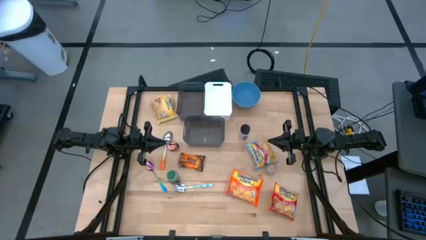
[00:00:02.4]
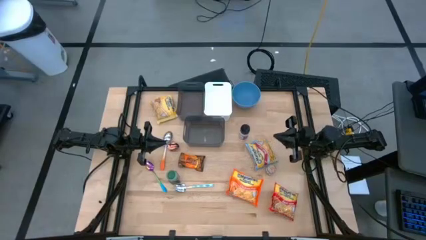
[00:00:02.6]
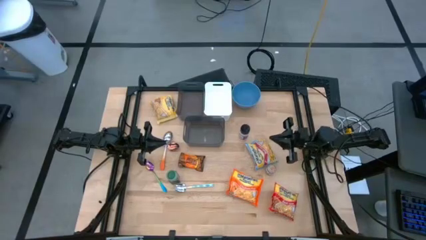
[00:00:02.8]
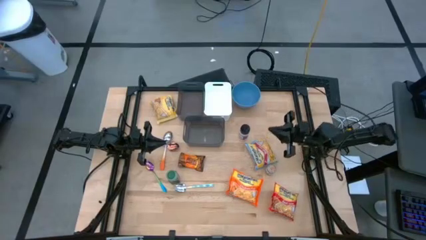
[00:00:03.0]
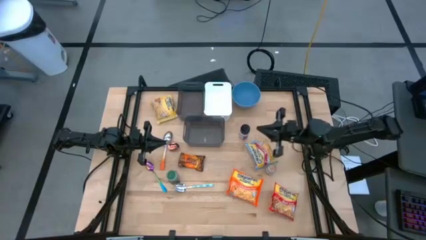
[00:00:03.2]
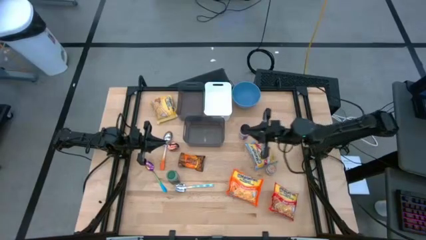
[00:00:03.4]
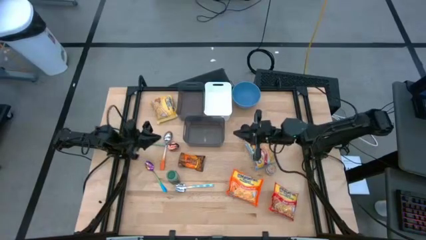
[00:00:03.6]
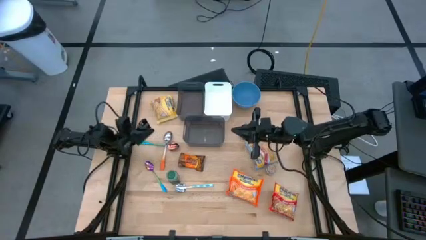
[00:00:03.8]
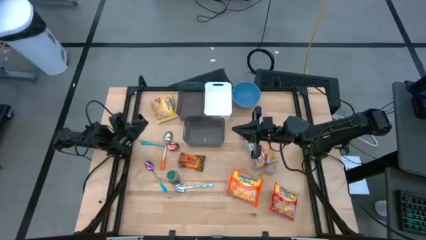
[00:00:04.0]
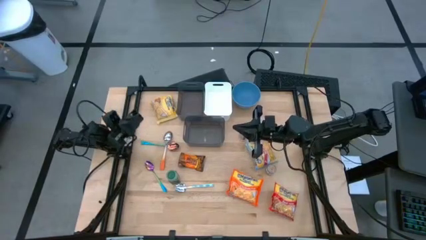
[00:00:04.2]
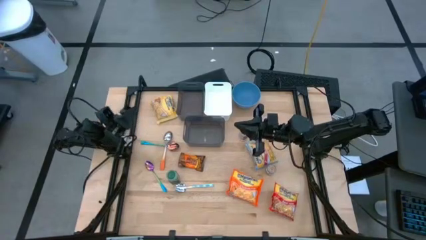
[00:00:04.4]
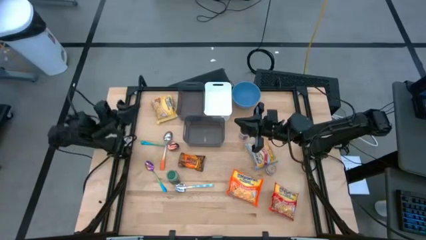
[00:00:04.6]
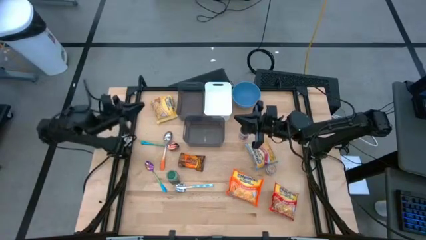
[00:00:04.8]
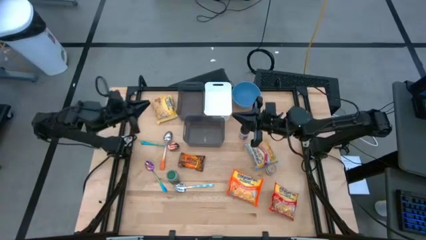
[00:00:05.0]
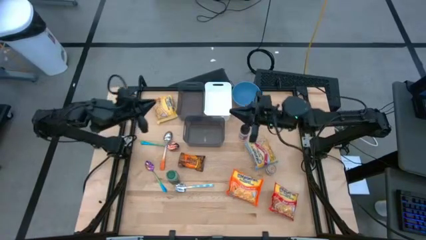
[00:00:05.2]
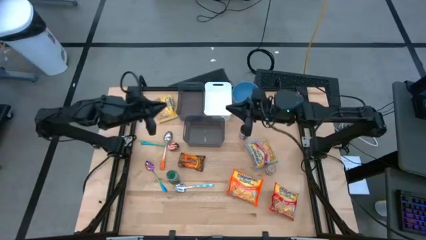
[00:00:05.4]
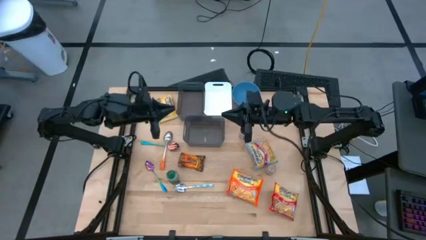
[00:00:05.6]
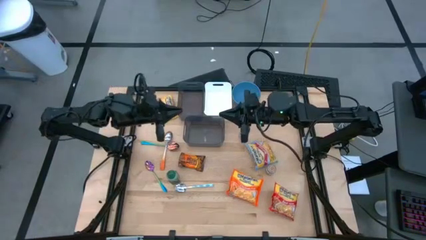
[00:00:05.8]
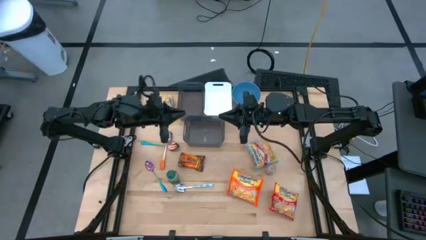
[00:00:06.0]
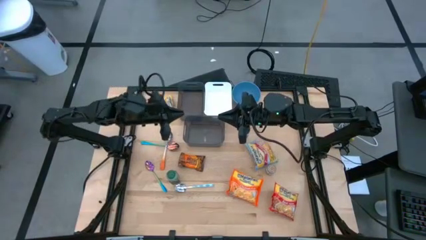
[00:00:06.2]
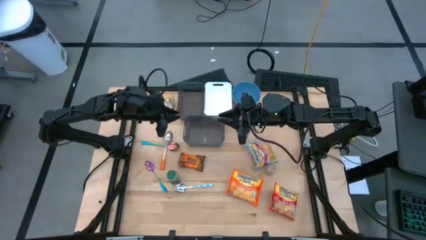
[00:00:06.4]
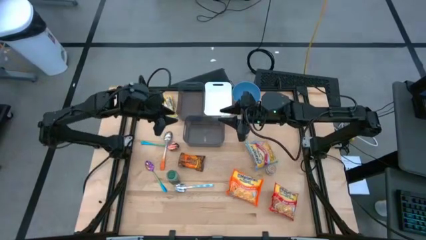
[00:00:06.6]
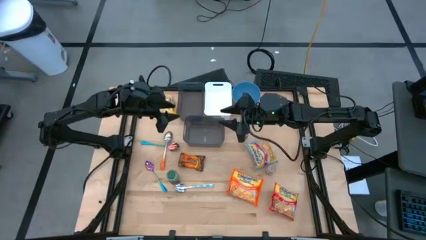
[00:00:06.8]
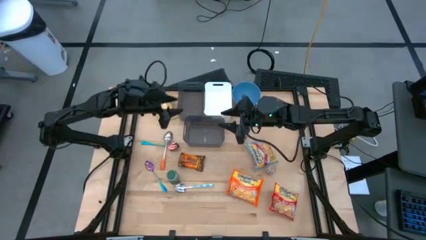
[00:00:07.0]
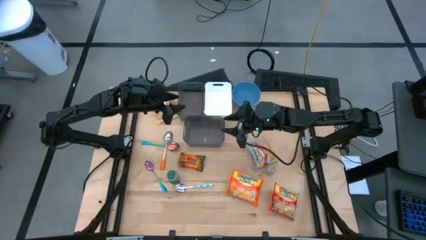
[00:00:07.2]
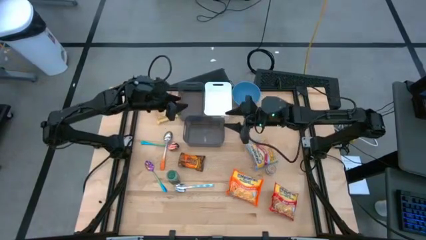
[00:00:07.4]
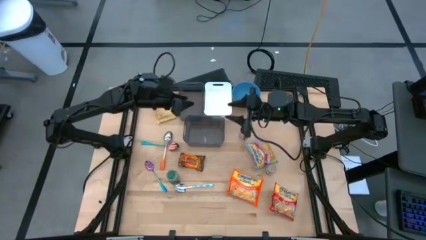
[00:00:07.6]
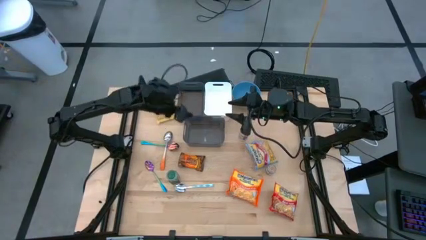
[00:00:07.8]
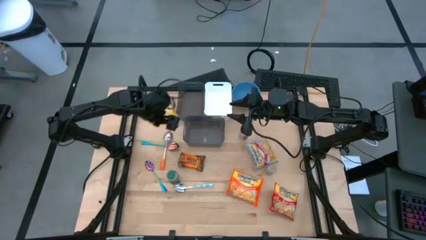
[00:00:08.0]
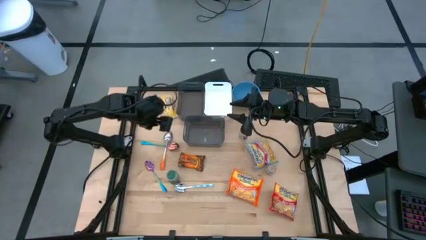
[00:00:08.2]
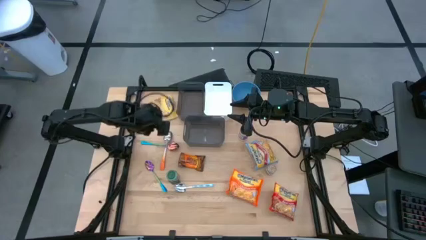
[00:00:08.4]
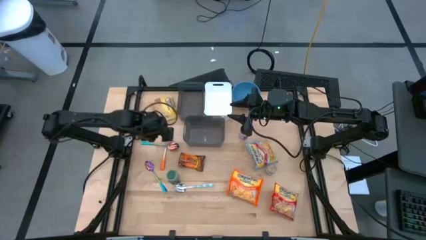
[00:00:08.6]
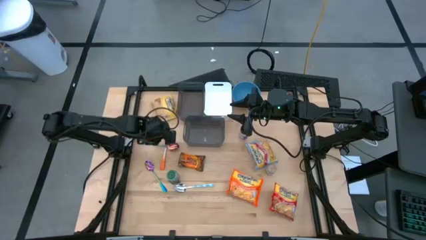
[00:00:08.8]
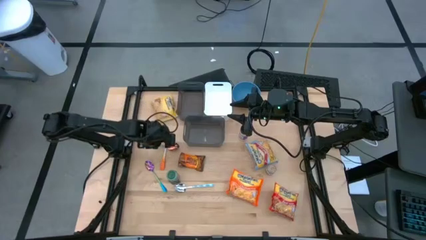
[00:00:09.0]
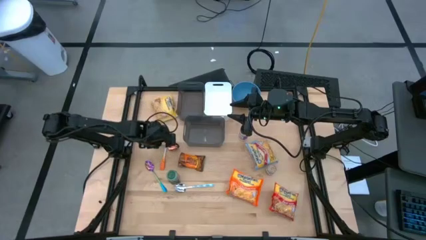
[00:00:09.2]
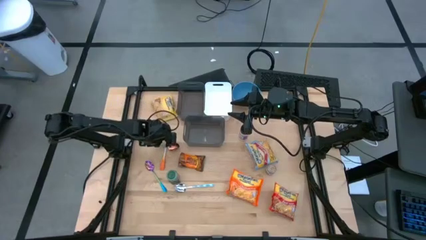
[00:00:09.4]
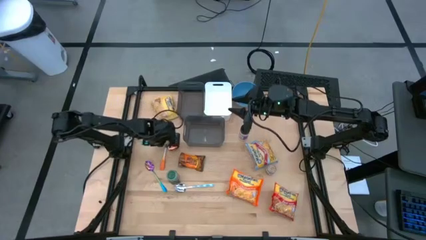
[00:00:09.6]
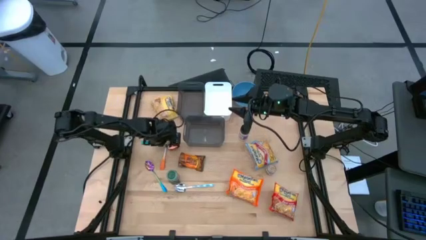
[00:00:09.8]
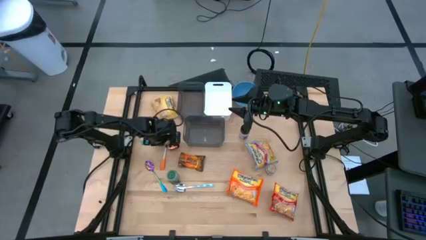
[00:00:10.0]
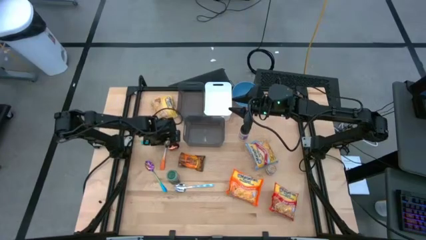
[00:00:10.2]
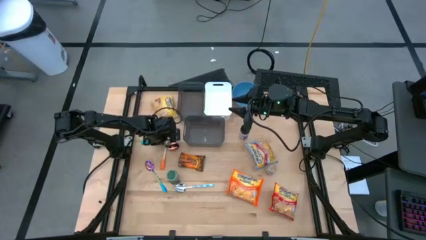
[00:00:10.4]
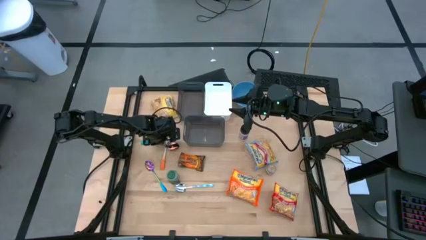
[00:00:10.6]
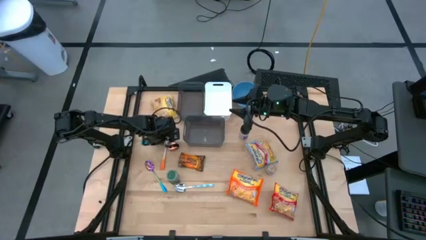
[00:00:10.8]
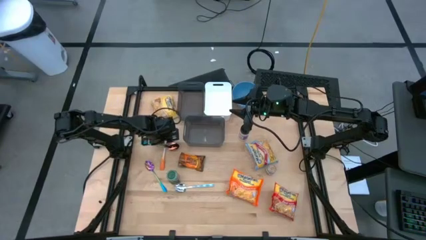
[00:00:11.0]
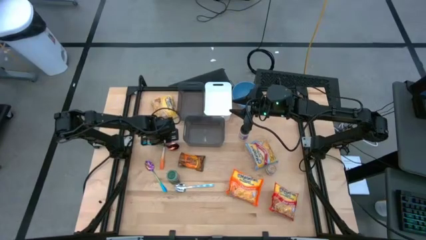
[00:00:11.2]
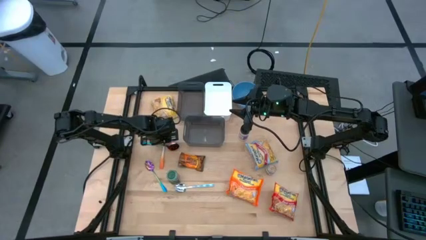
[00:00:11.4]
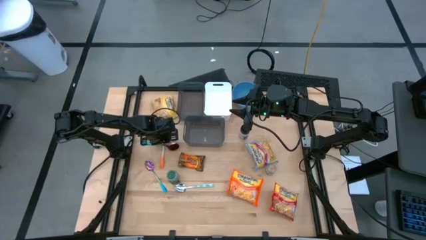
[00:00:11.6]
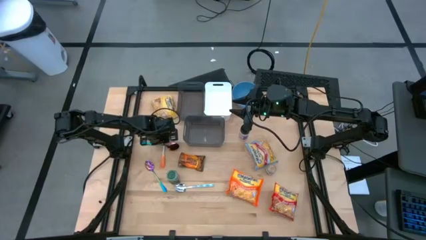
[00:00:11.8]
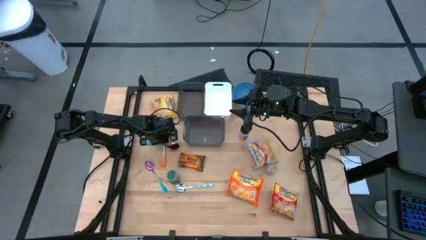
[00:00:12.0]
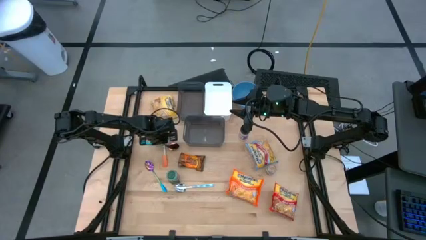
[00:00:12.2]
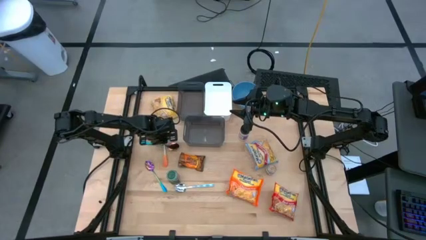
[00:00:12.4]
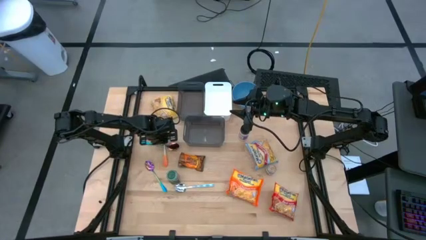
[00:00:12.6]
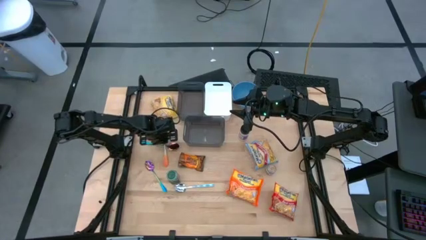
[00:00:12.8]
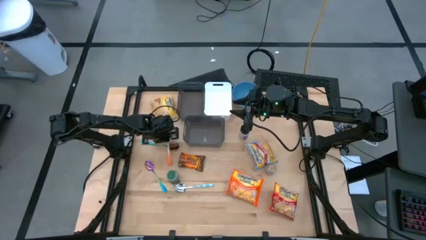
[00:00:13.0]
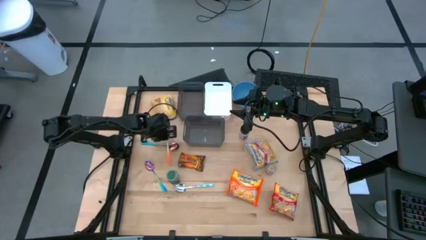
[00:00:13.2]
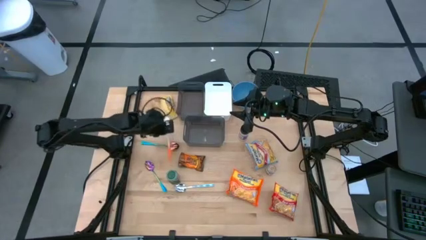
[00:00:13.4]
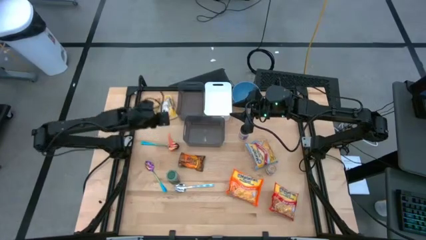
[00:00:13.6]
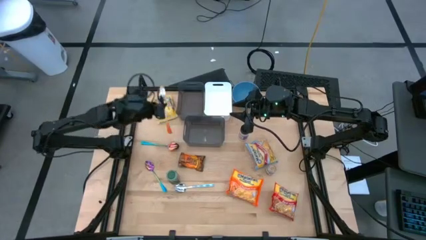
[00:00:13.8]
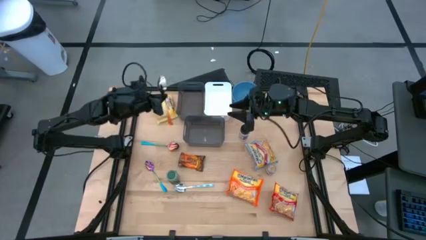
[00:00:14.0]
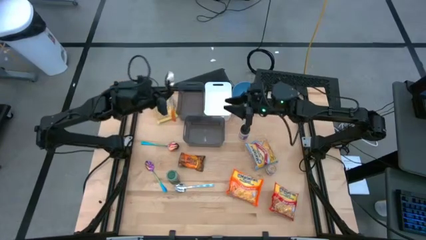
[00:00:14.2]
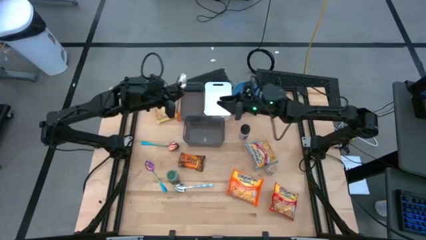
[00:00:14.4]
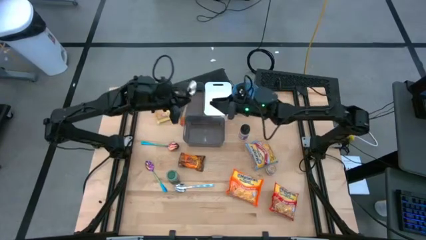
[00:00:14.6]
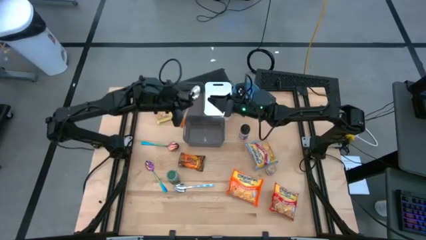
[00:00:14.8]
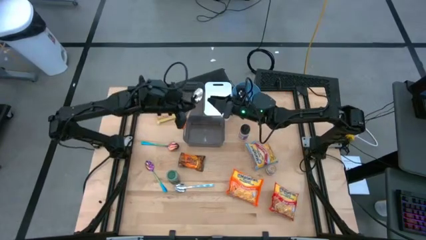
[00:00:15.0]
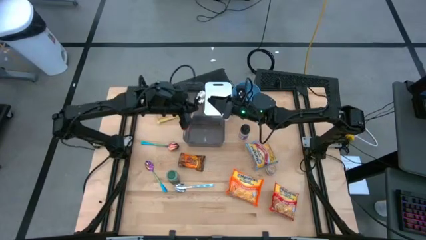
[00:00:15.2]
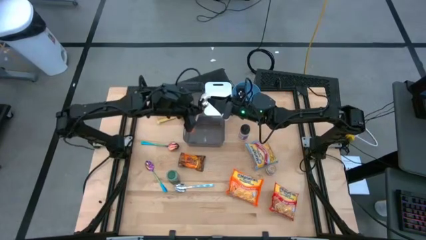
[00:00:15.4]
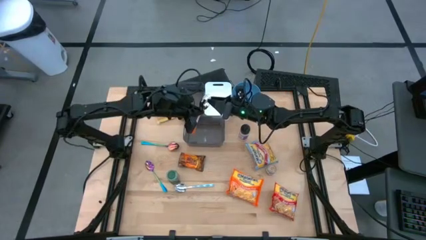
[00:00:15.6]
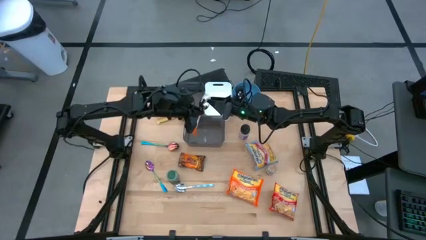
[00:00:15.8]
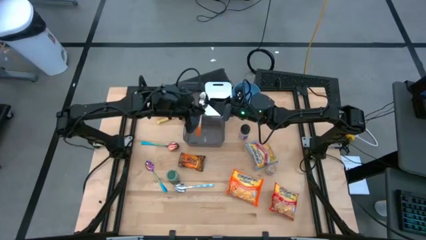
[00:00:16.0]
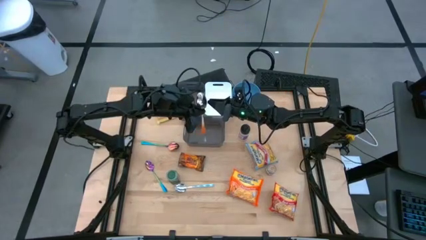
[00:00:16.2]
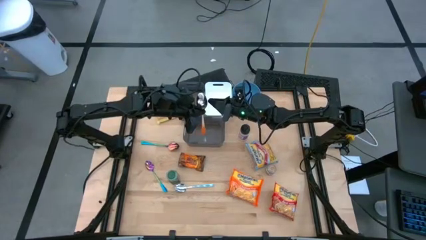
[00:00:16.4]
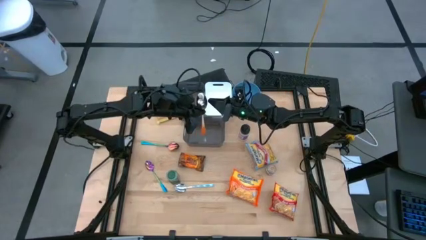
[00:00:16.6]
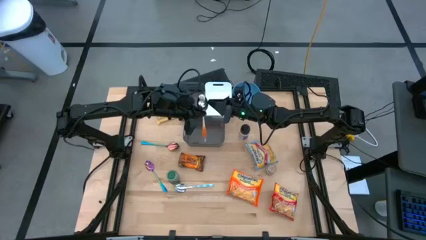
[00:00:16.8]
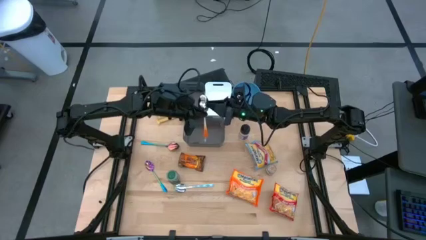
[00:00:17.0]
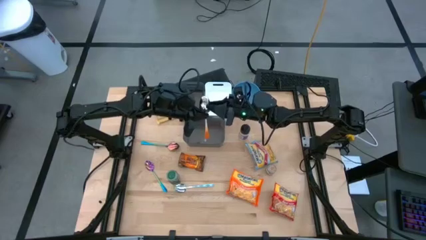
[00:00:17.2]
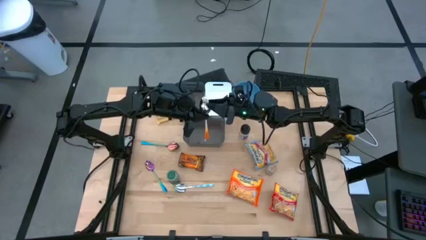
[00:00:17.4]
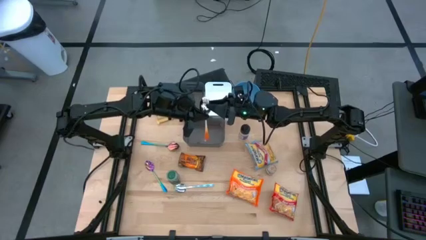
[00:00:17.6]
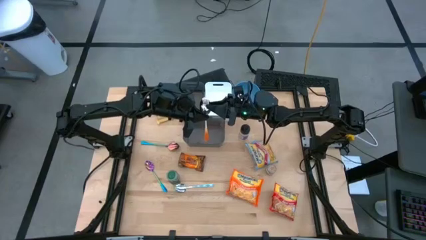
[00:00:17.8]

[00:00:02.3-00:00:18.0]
Task: Pick & Place Food Item
Put the orange spoon into the bottom black bin
